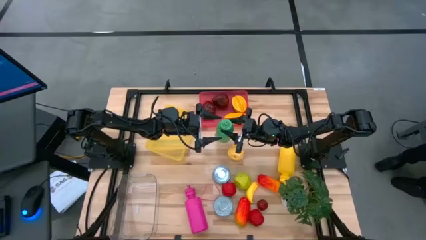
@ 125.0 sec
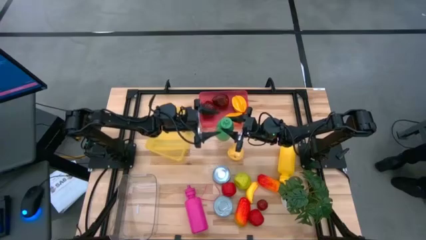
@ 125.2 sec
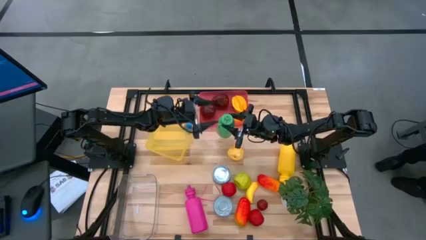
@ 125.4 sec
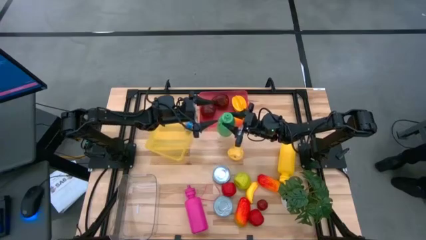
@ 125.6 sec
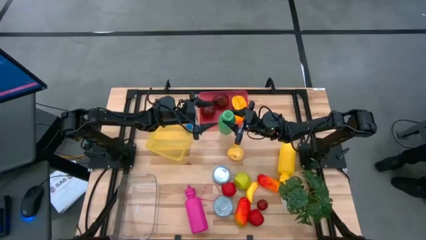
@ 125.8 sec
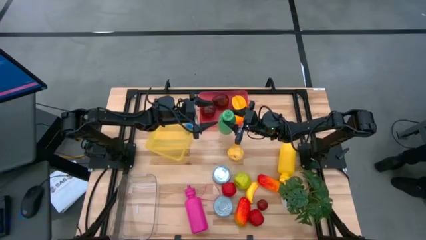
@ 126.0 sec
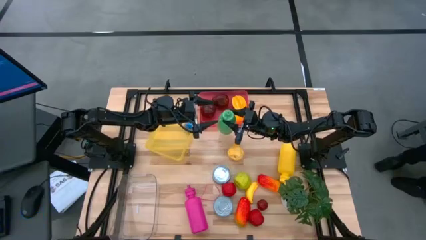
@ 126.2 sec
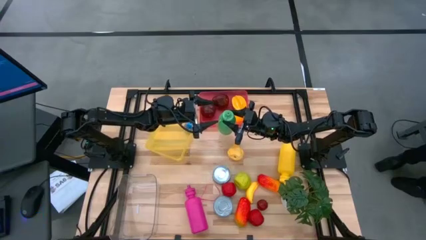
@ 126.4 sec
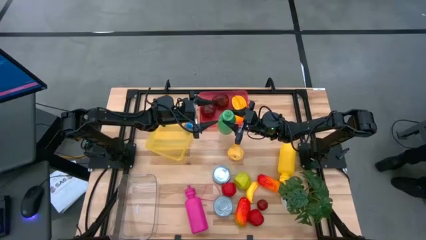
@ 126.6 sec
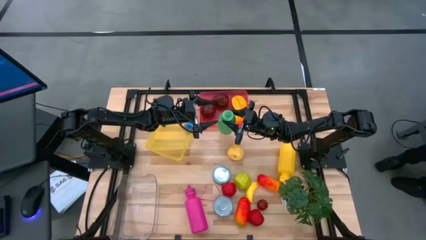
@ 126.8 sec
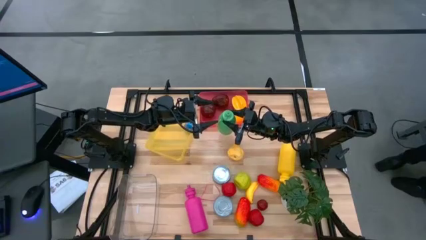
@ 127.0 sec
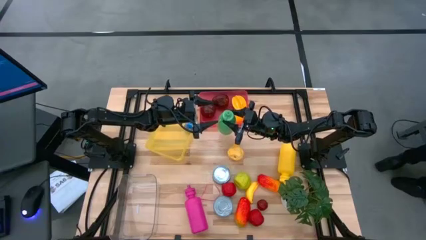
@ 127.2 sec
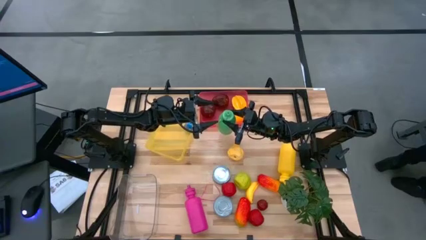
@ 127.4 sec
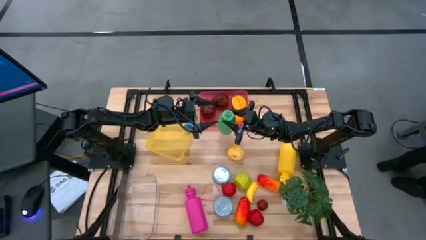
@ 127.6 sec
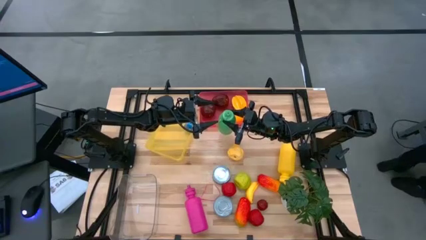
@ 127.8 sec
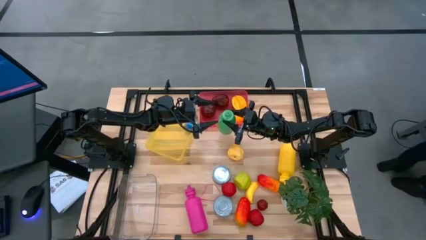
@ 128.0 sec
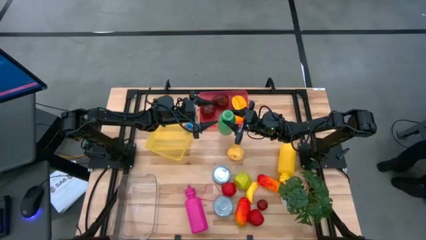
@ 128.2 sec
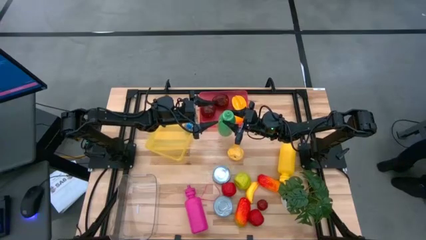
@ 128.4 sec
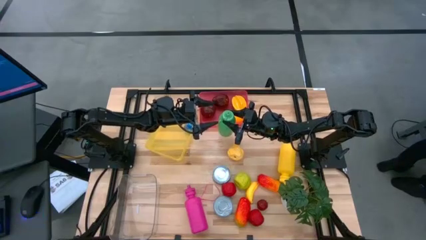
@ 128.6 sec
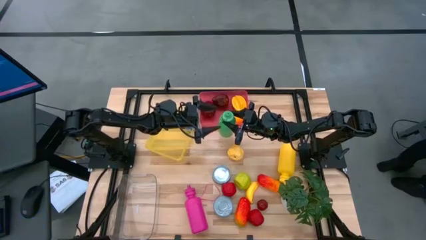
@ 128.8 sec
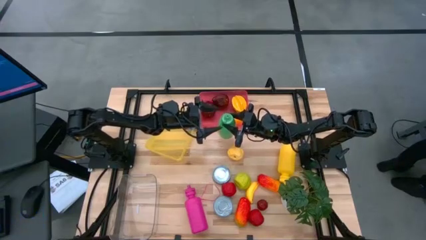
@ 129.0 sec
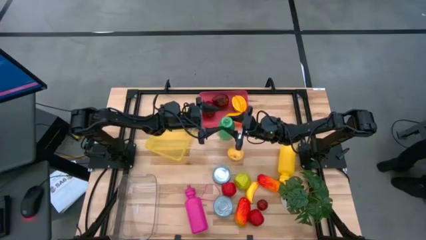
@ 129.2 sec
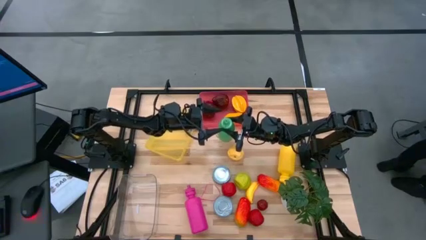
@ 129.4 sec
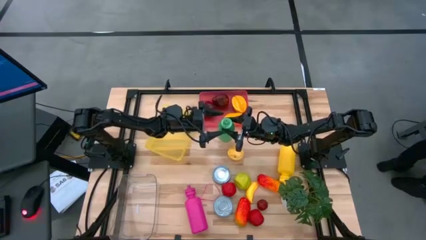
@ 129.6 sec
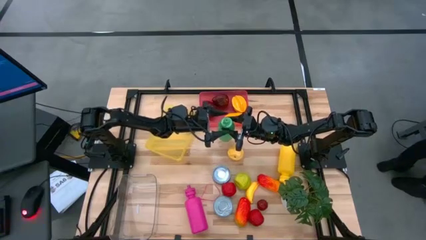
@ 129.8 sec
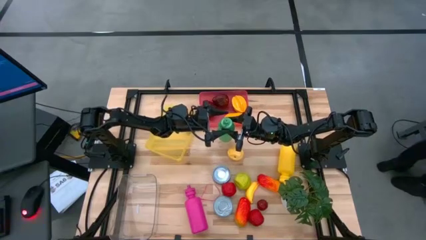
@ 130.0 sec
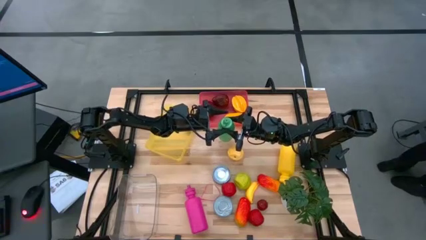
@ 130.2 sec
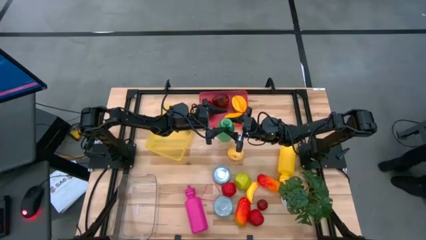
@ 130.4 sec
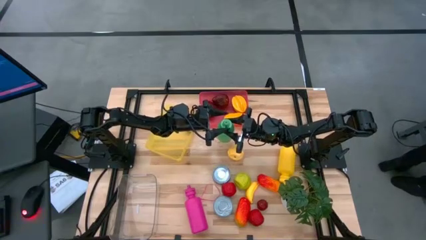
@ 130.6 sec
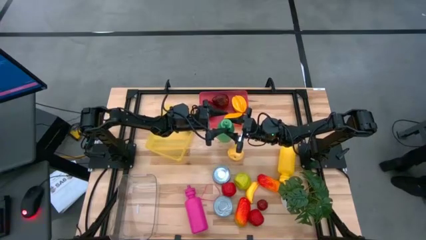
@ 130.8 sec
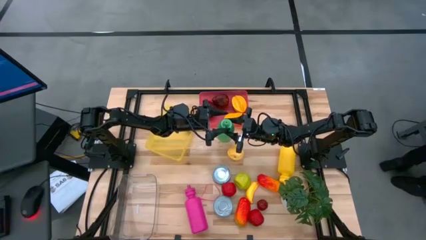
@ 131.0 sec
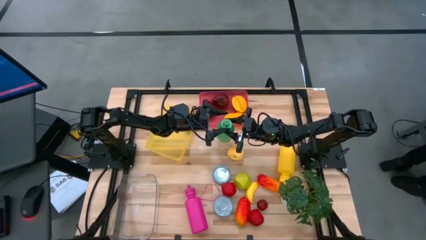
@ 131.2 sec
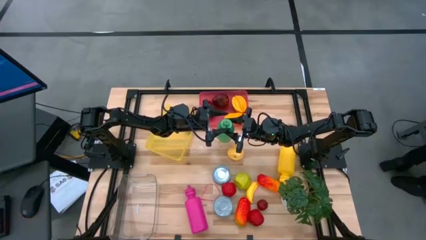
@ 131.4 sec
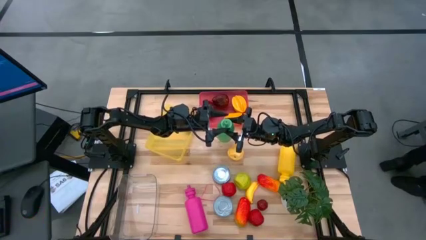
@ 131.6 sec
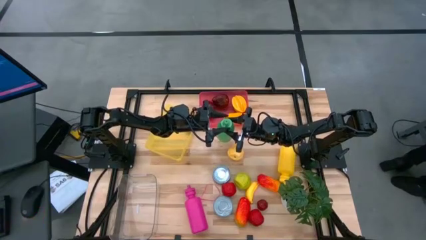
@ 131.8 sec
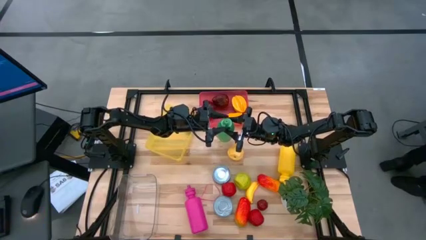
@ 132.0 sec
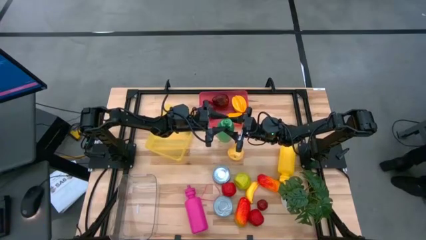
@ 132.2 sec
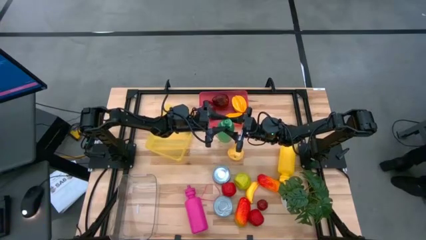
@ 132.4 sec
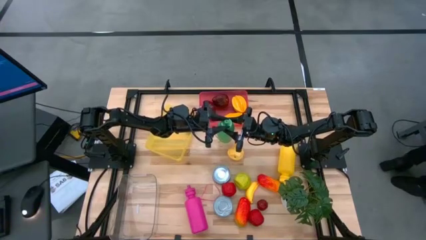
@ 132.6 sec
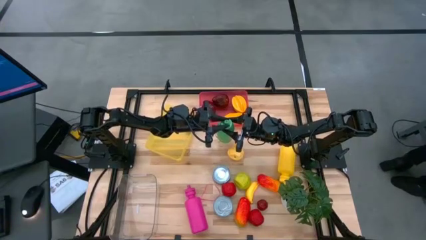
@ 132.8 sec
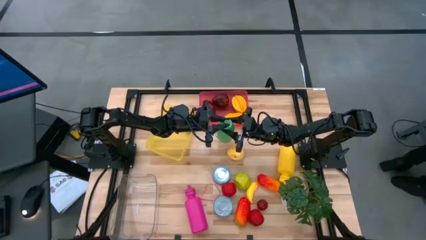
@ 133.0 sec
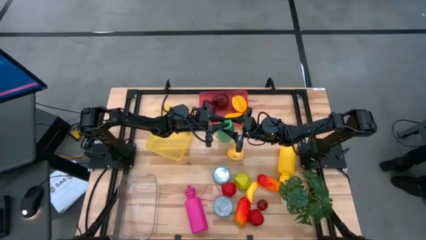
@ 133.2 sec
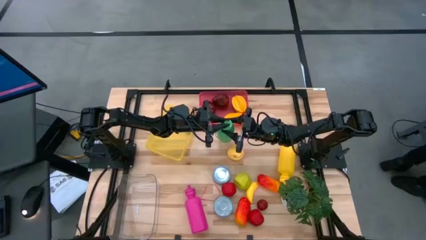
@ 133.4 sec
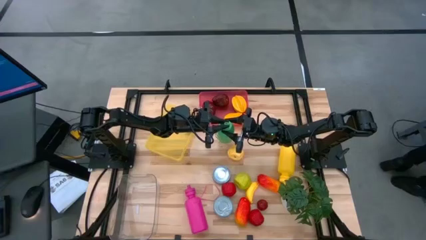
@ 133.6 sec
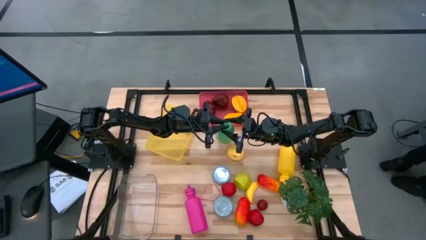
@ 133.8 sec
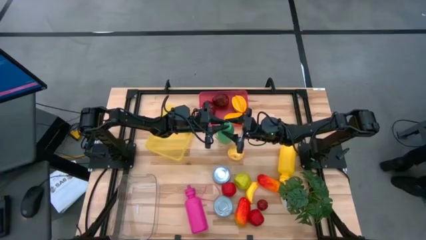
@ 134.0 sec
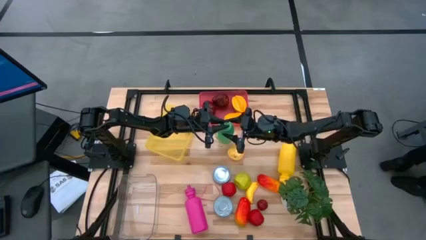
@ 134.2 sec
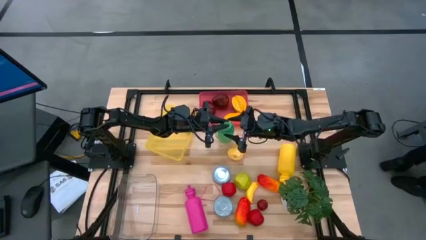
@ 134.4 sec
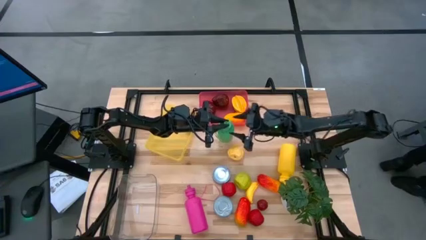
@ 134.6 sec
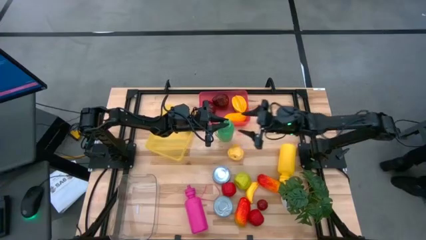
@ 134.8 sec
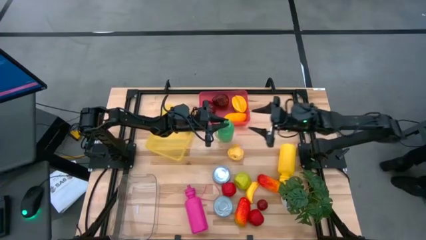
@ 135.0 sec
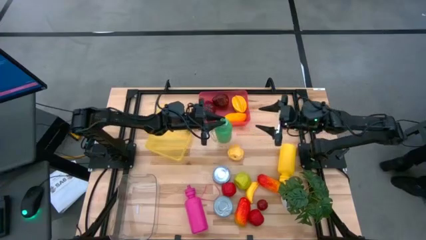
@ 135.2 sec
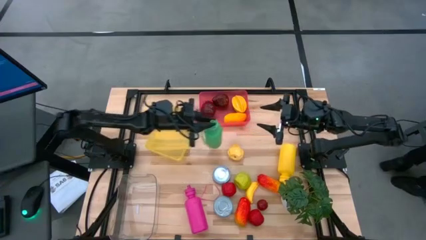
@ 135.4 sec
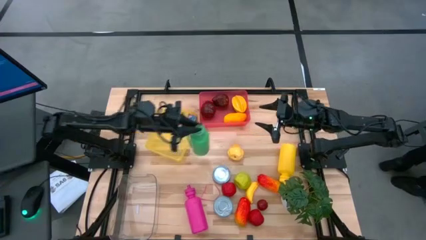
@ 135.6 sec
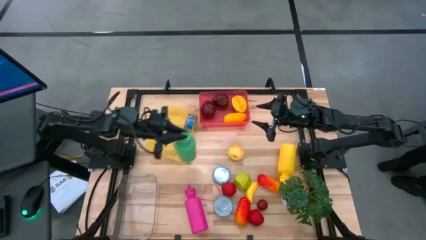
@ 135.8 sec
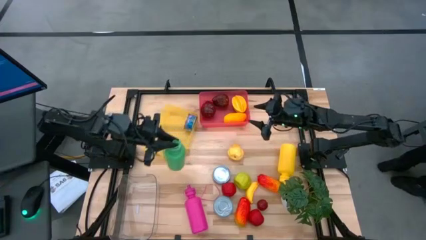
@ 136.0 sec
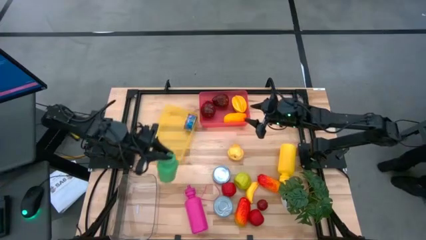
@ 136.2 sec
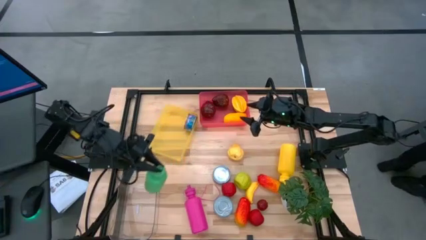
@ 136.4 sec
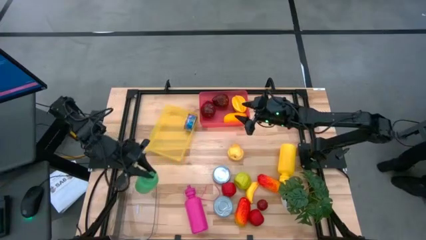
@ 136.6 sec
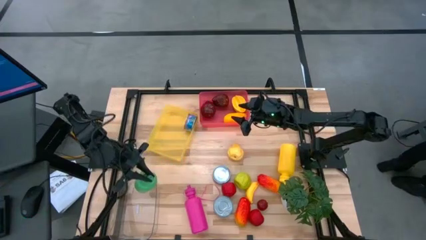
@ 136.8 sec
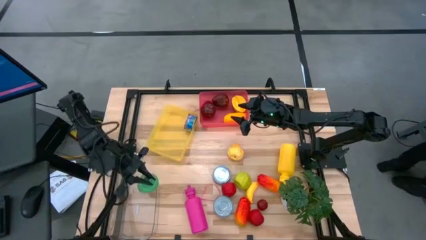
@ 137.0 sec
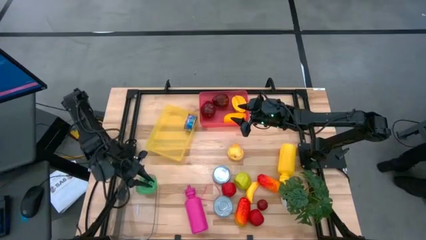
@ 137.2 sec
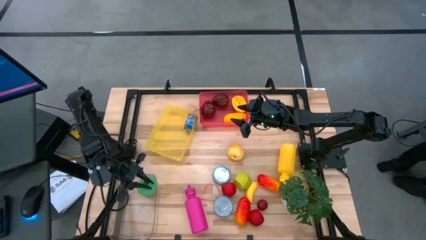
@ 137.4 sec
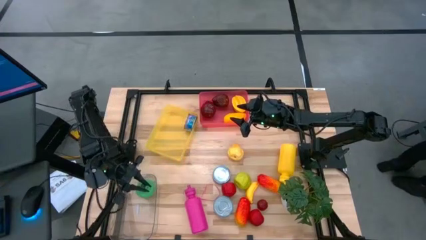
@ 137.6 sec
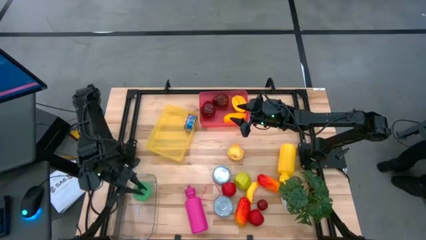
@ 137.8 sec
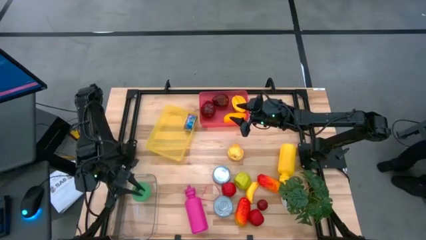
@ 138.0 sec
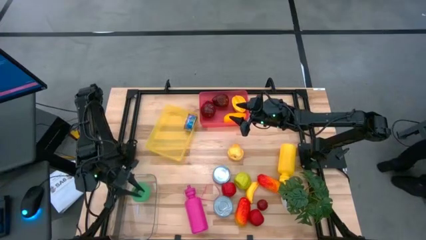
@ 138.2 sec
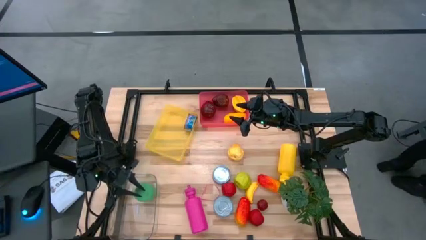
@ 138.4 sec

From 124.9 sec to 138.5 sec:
Task: Pick & Place Food Item
Put the green water bottle into the transparent bin
